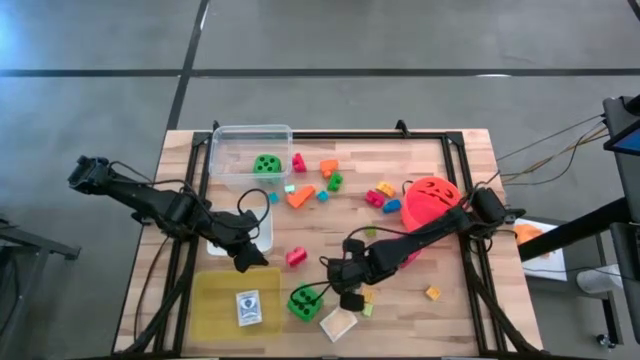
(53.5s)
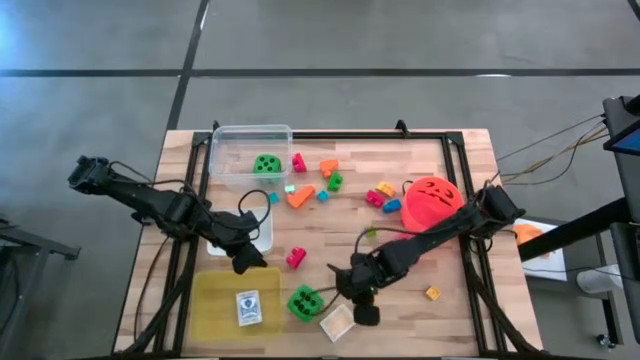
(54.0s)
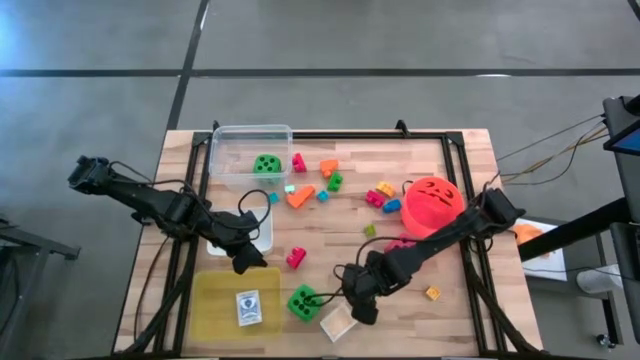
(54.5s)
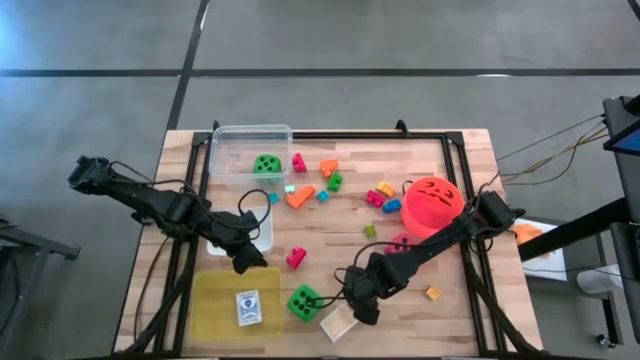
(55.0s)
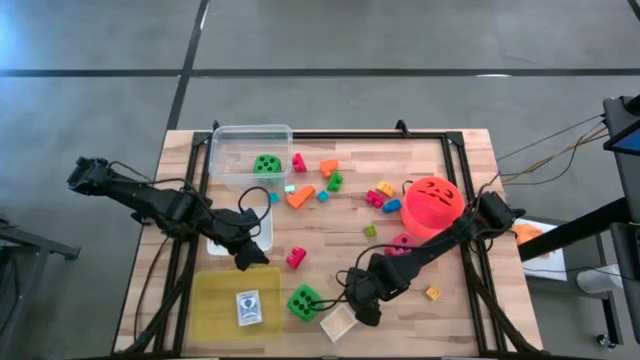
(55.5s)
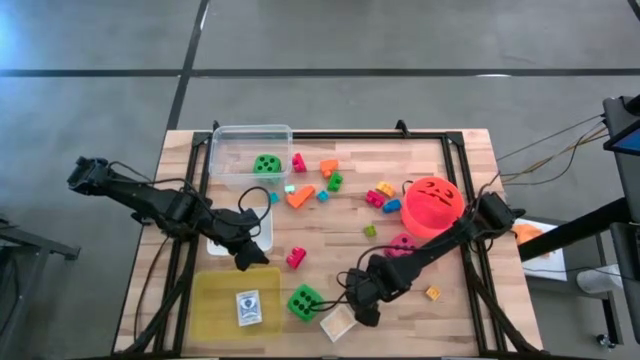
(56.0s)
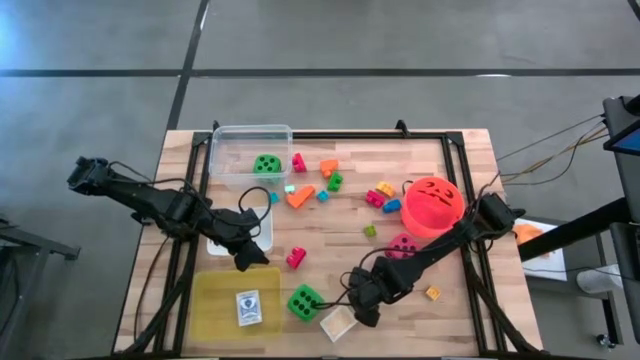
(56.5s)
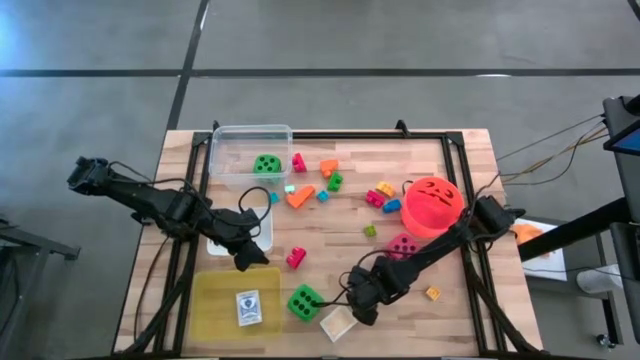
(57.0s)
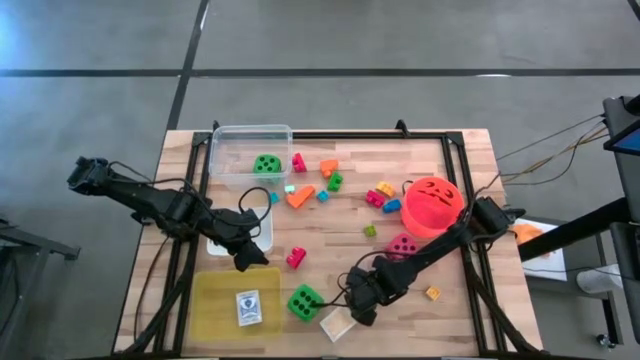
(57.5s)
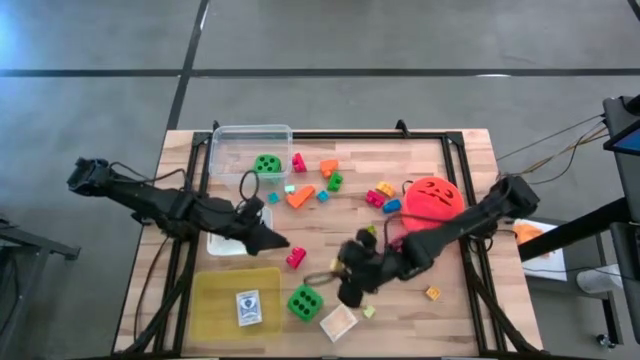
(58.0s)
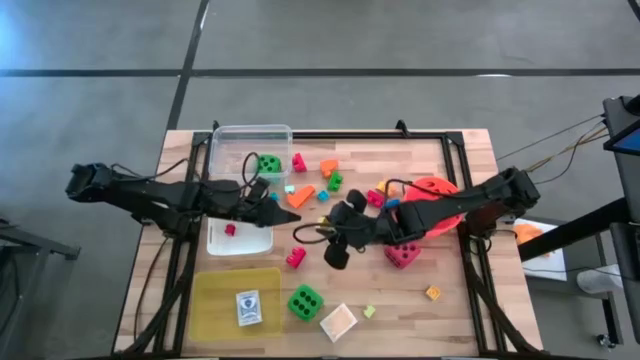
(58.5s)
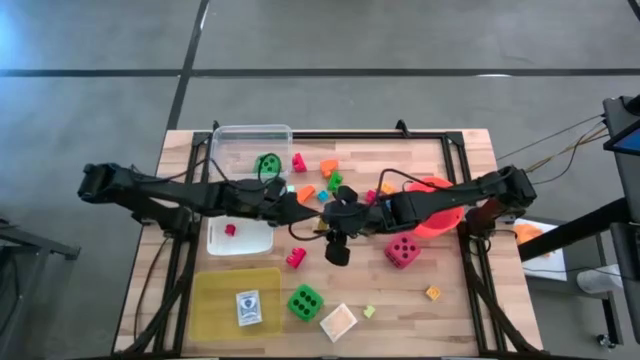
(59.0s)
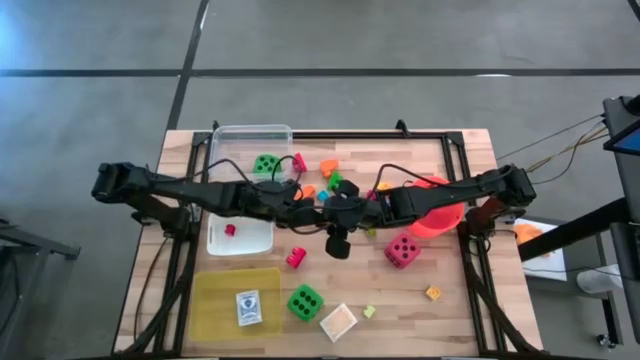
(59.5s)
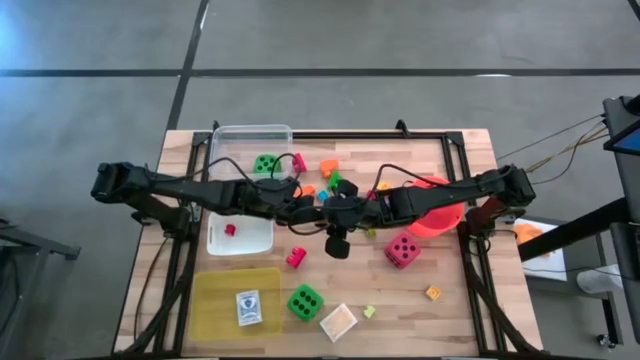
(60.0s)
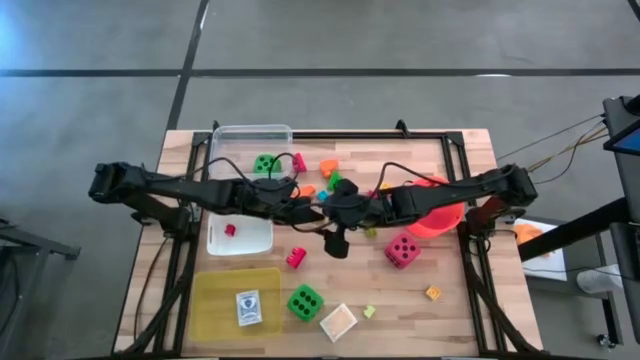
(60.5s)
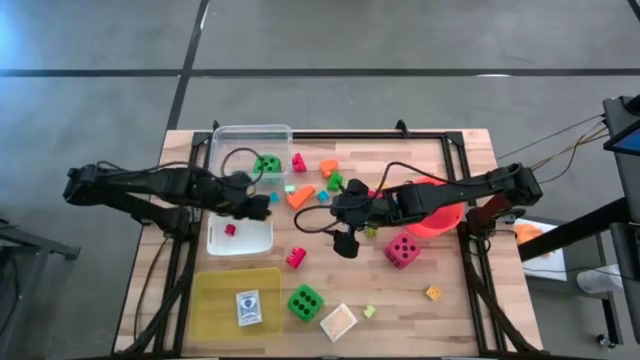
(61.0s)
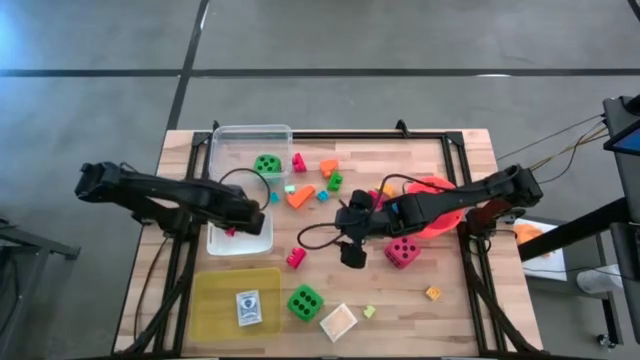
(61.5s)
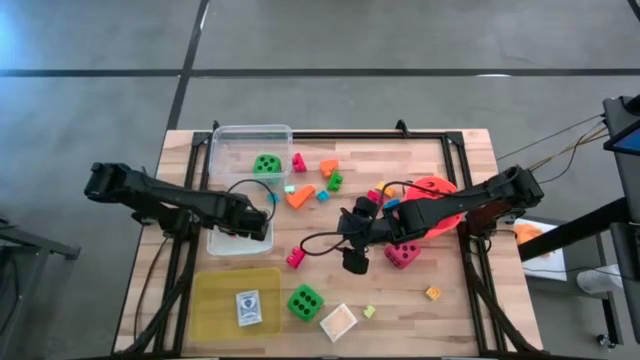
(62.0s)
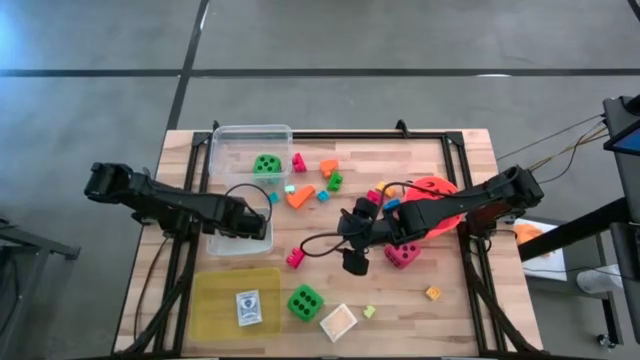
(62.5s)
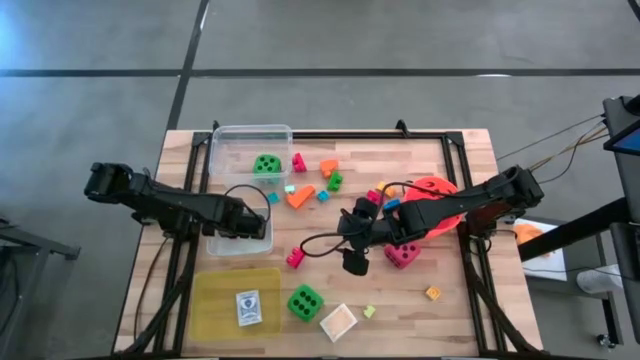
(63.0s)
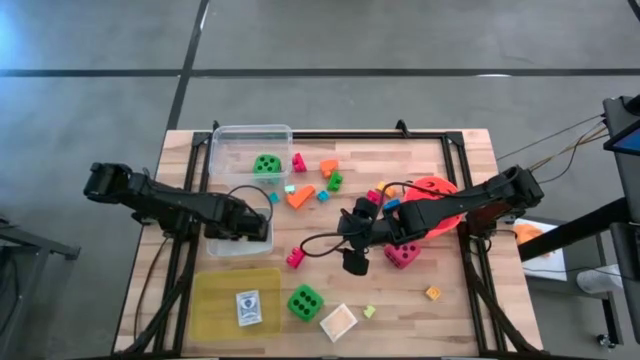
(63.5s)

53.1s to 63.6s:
Task: Pick & Place Toys
Put the yellow game piece into the white bin

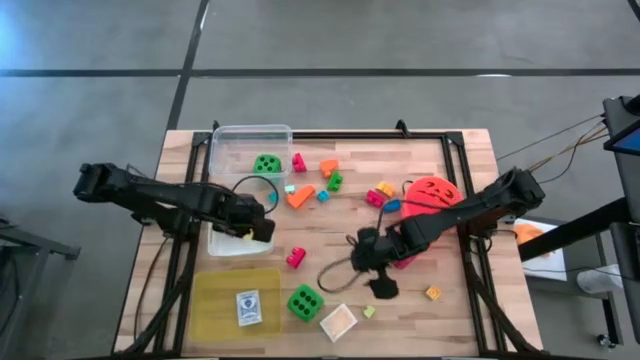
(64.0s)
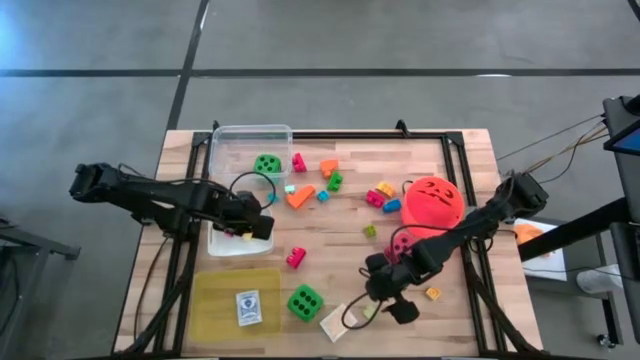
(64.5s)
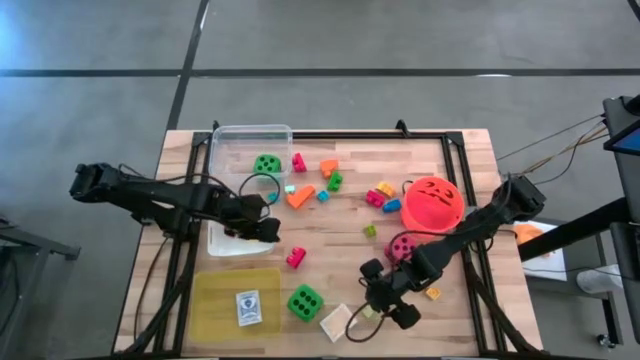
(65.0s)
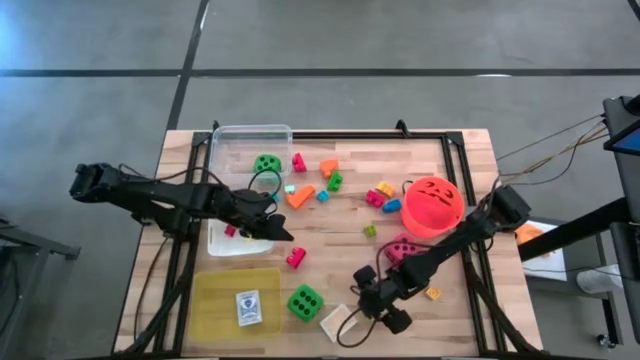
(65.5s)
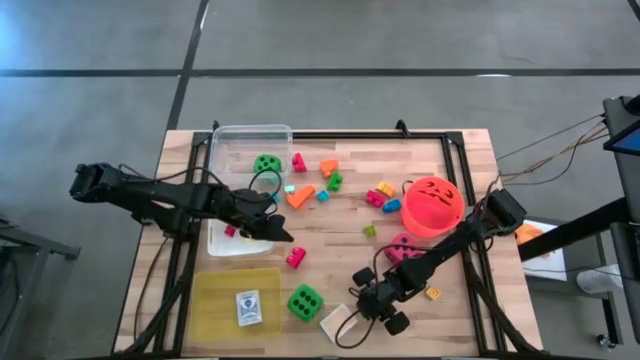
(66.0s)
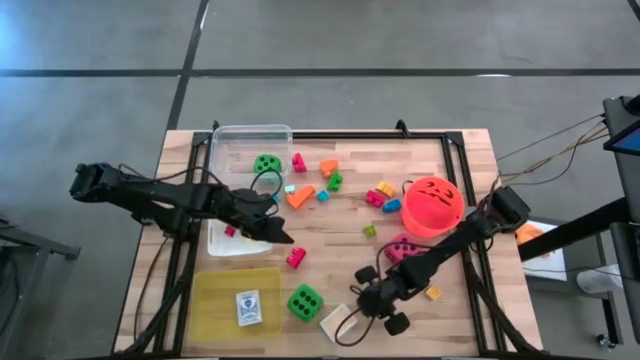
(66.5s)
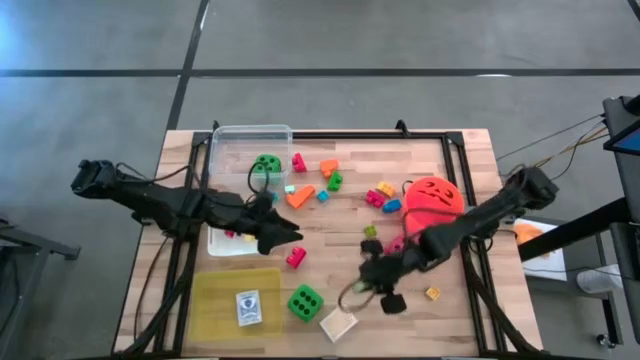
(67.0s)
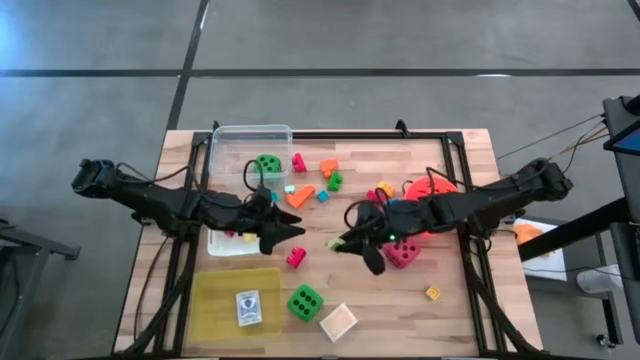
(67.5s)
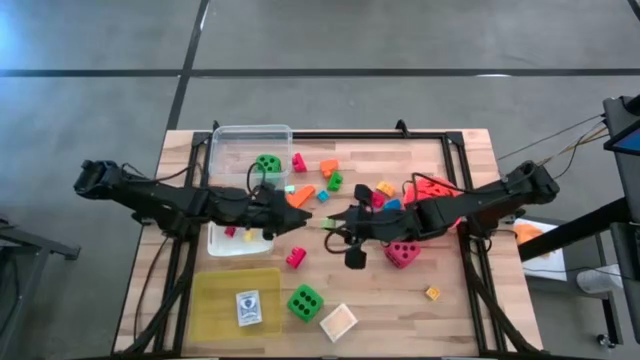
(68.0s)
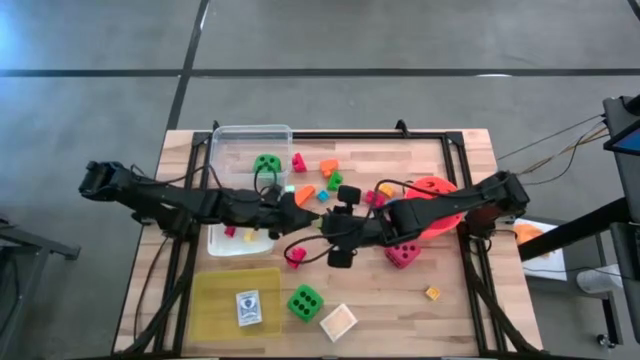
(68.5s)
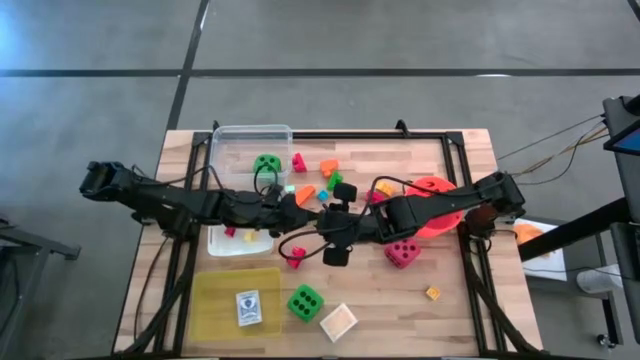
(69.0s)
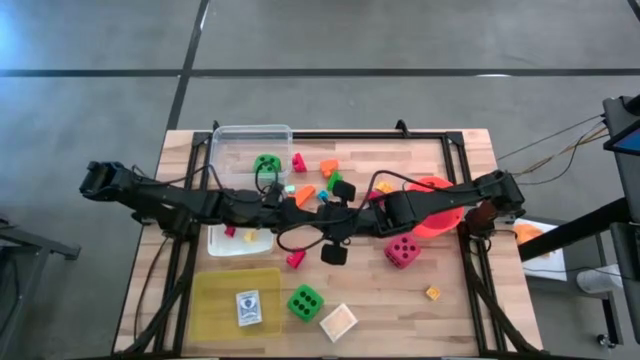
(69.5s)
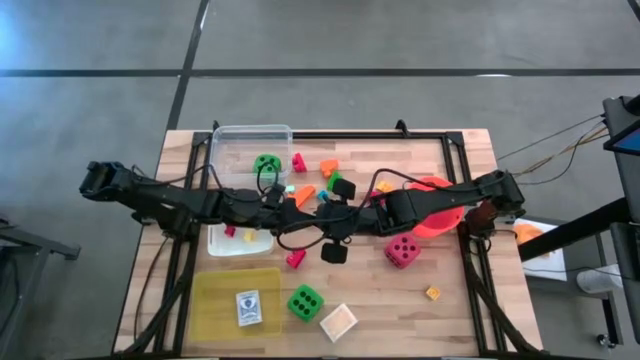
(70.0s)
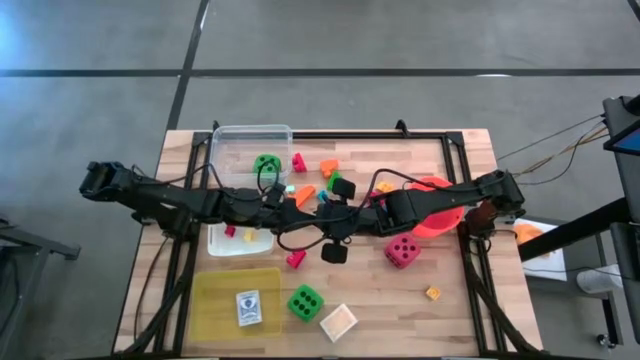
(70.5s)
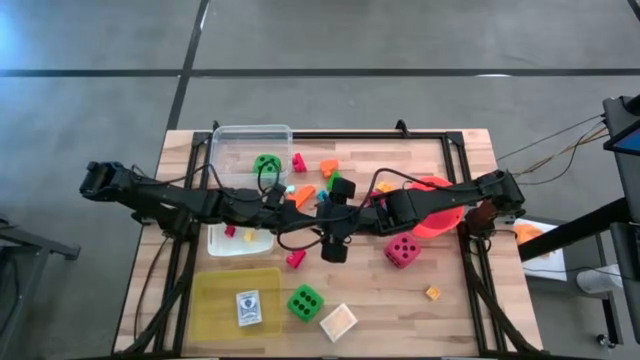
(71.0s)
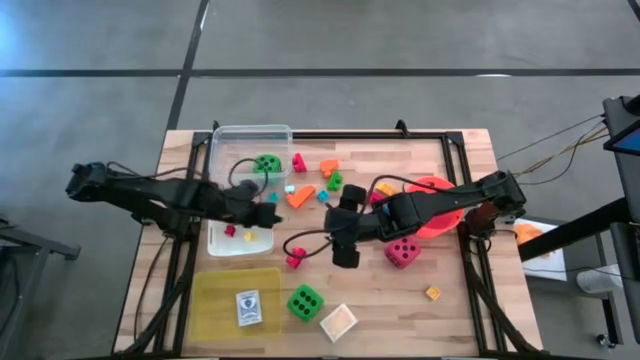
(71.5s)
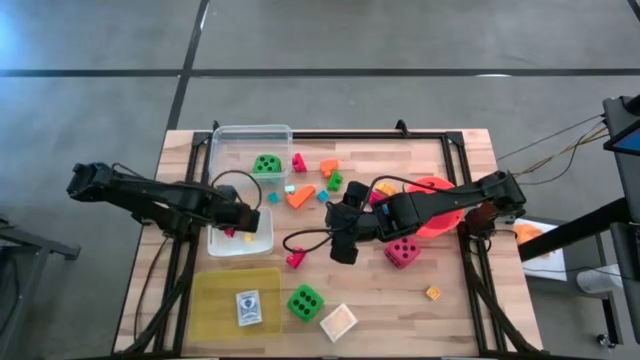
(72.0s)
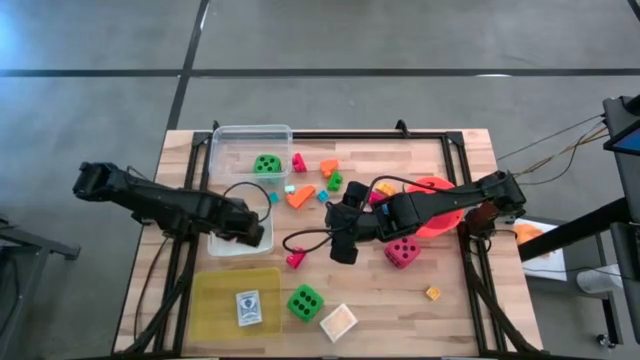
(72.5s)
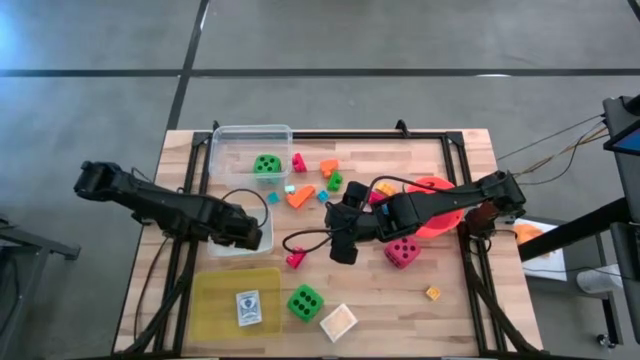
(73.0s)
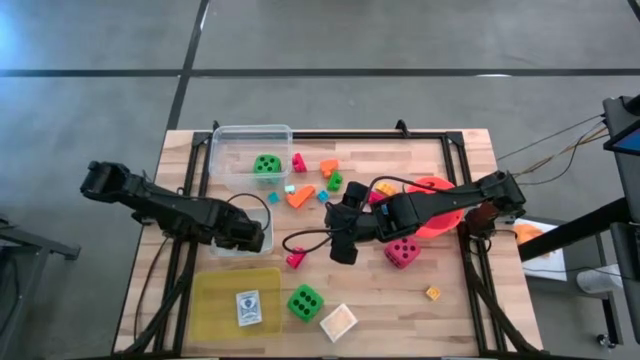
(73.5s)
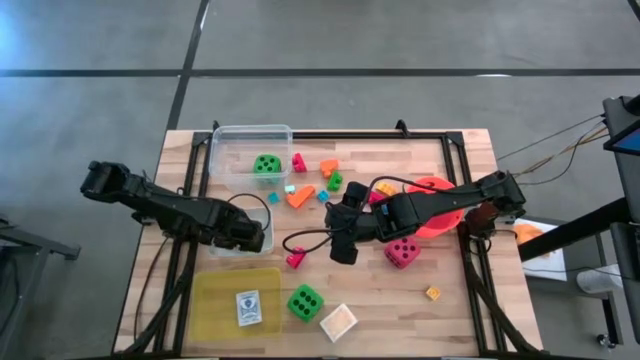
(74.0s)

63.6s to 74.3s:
Put the light green game piece into the white bin
